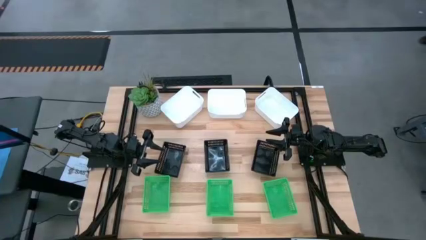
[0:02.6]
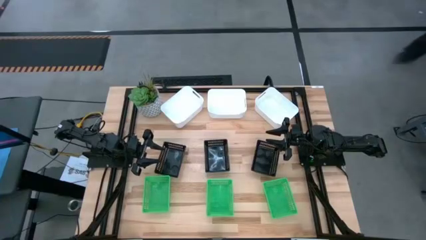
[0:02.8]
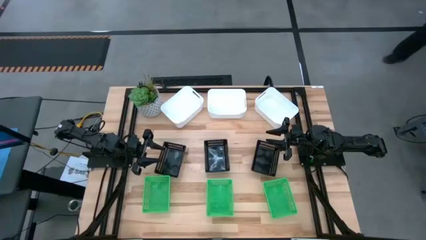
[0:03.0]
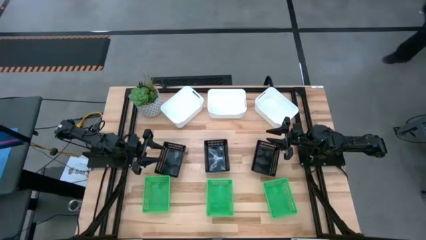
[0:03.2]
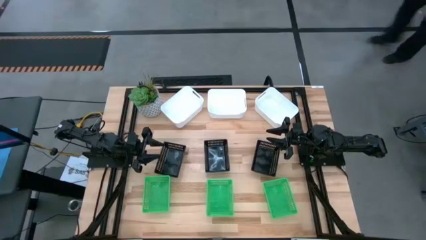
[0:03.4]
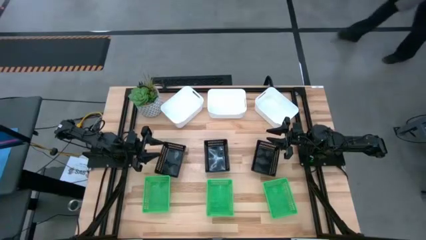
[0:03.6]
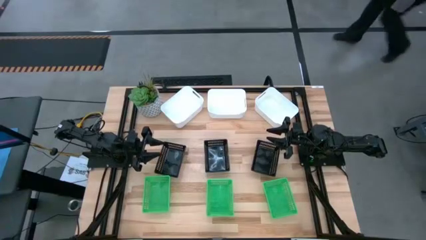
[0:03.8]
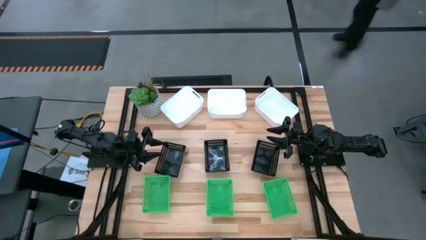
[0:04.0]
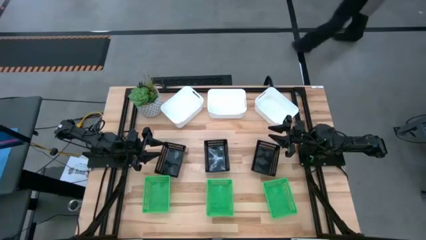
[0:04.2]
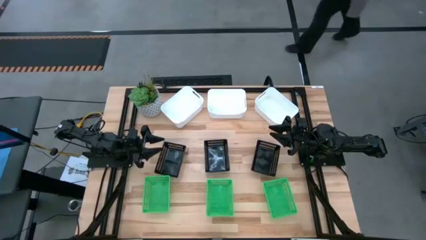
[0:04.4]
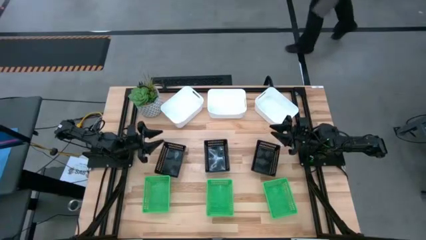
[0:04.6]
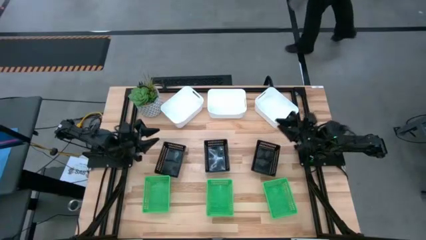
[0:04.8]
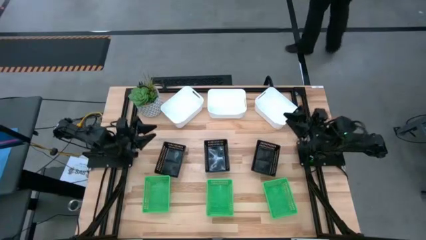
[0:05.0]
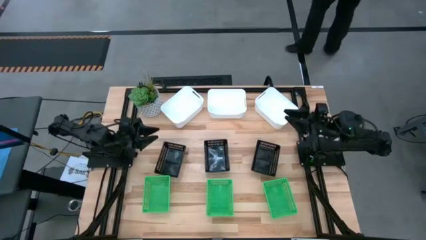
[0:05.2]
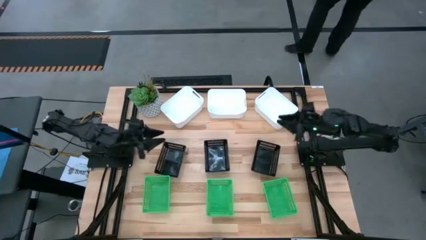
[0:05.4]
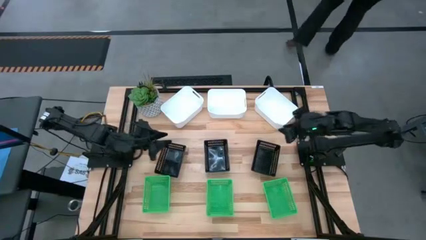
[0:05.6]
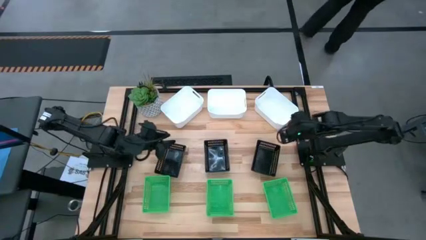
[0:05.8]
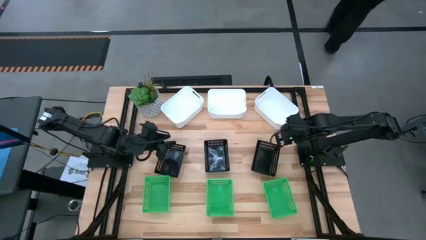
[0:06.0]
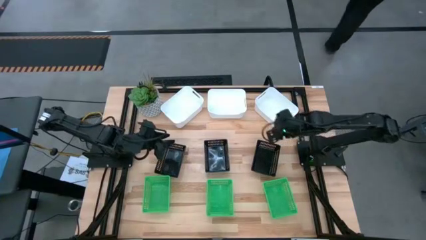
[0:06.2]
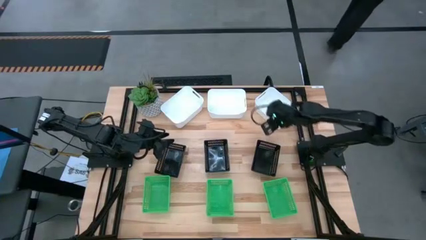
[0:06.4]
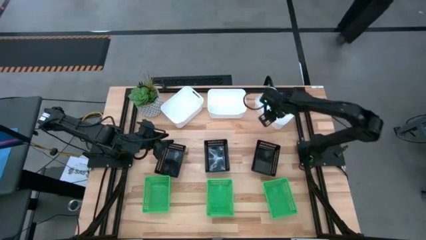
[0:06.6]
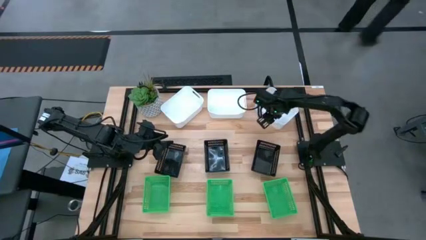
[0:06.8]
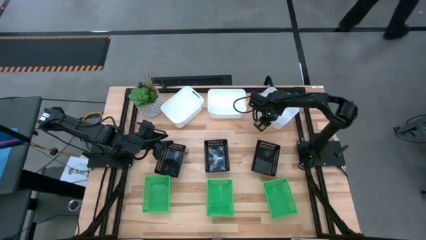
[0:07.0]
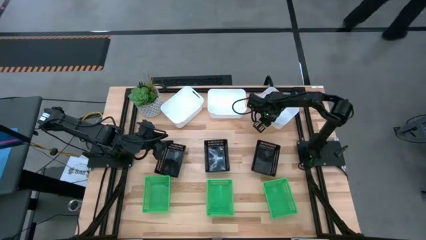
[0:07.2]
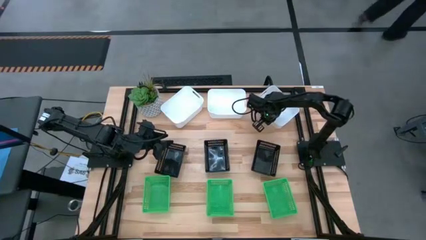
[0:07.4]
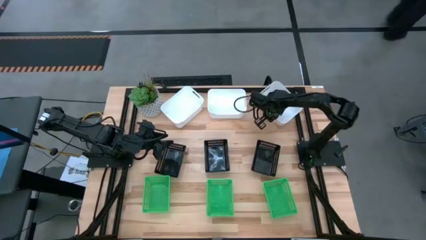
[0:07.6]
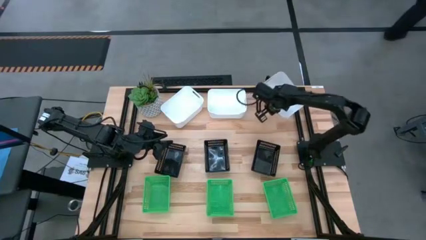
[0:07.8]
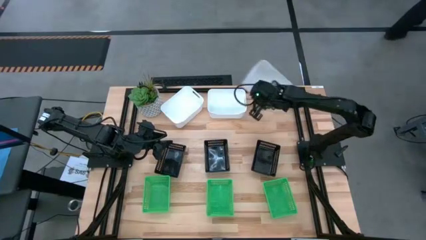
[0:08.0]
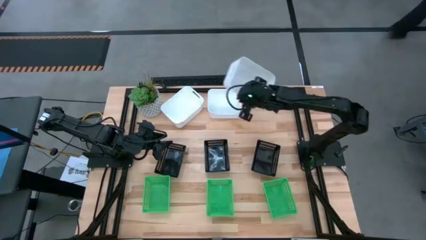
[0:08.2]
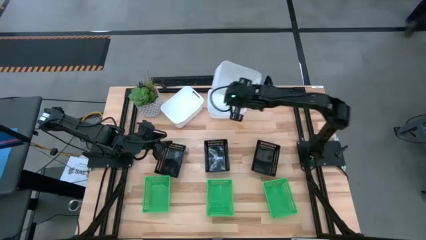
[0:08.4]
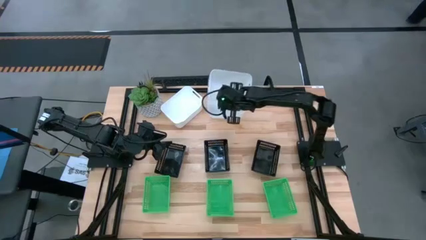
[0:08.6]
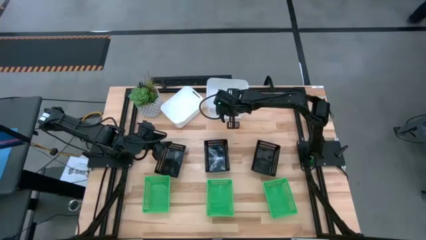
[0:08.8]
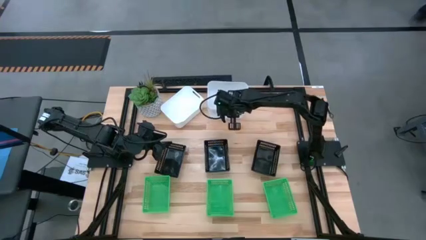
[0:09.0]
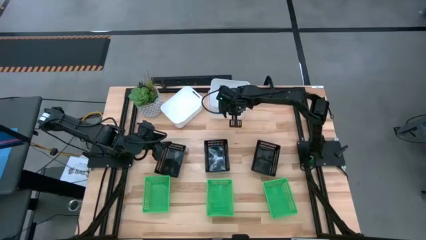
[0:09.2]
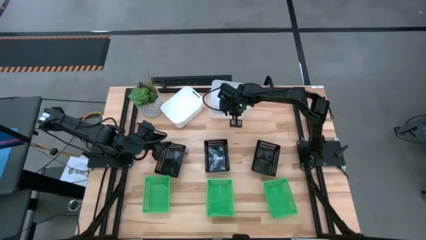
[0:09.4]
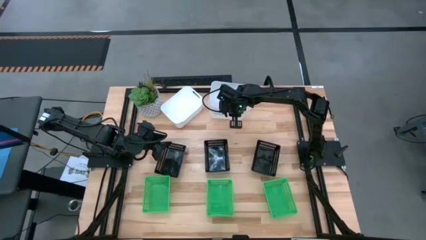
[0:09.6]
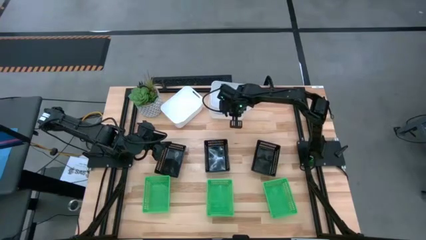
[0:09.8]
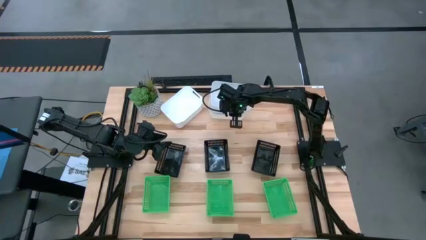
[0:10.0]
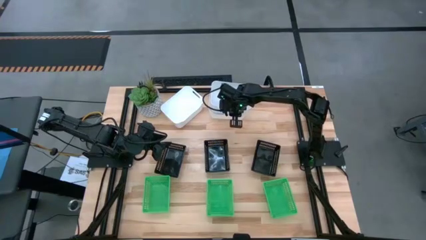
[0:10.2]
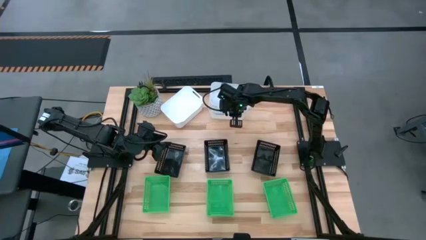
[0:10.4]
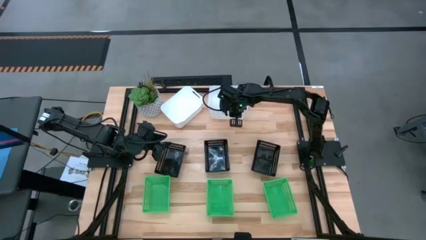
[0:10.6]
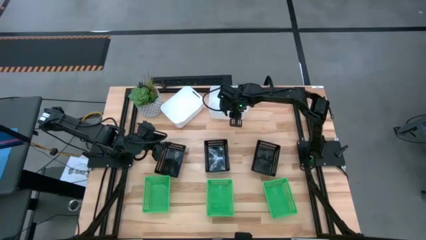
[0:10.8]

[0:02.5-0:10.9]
Stack the right white bin on the middle white bin

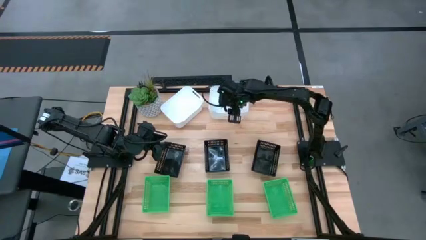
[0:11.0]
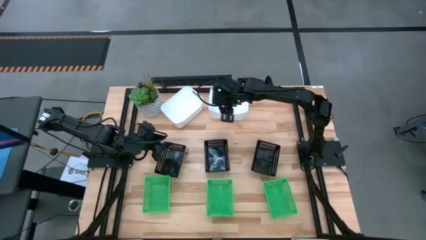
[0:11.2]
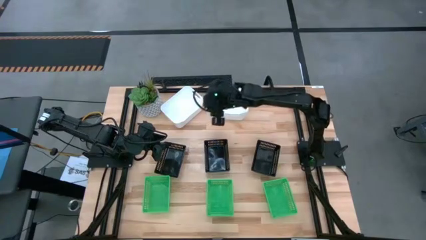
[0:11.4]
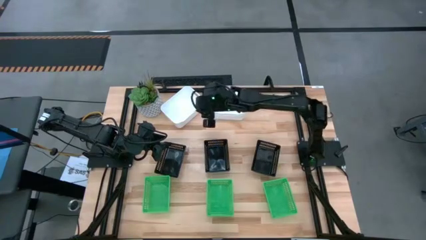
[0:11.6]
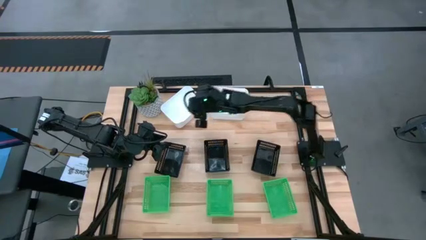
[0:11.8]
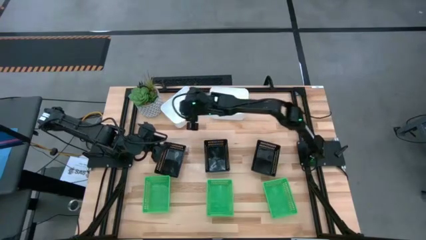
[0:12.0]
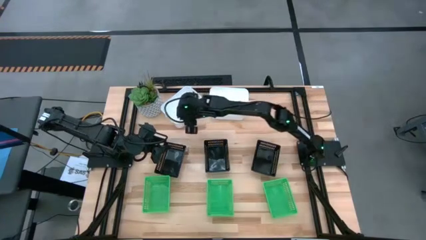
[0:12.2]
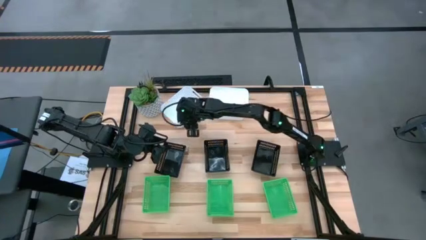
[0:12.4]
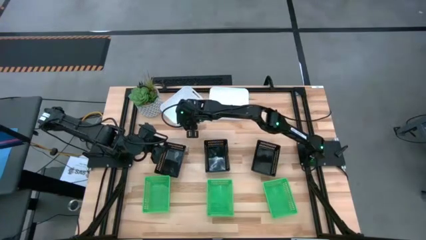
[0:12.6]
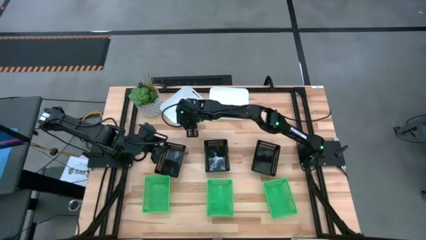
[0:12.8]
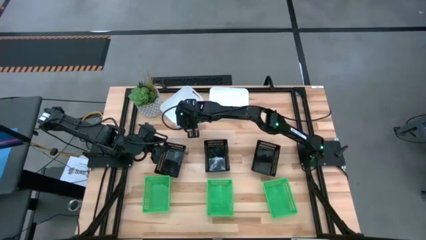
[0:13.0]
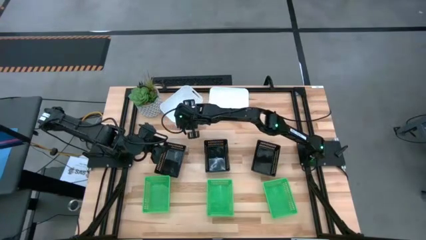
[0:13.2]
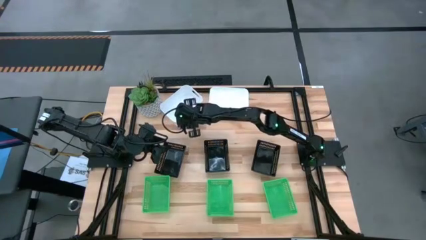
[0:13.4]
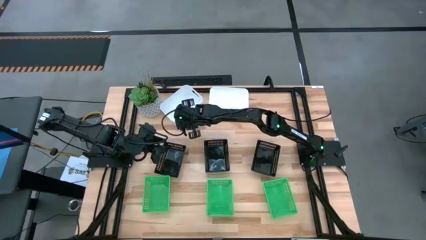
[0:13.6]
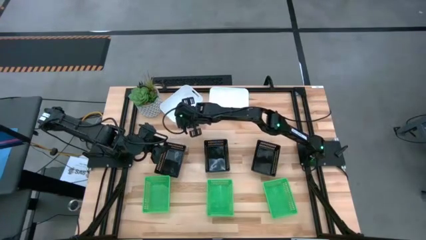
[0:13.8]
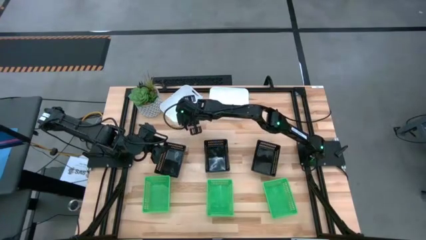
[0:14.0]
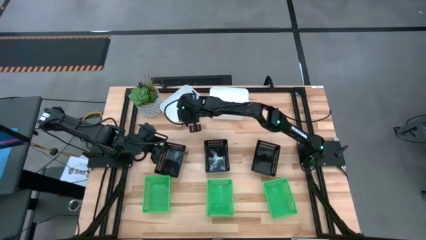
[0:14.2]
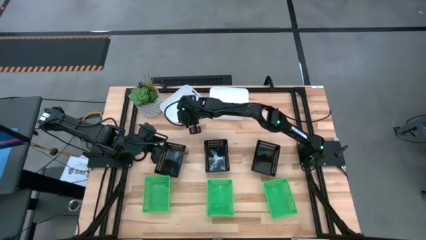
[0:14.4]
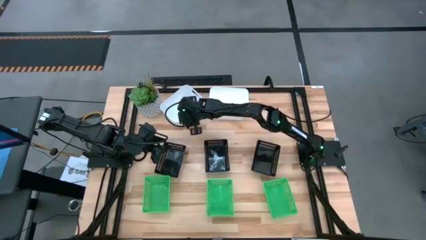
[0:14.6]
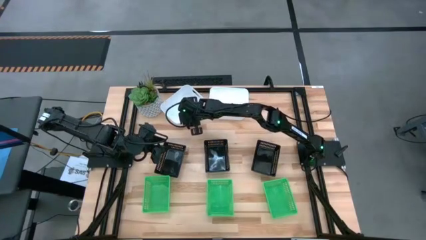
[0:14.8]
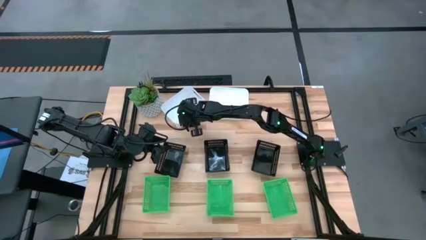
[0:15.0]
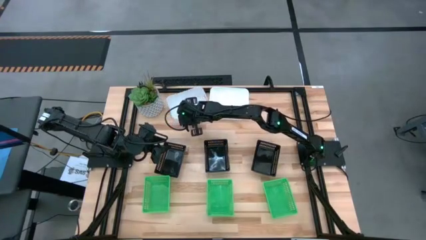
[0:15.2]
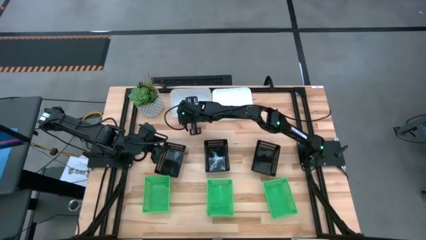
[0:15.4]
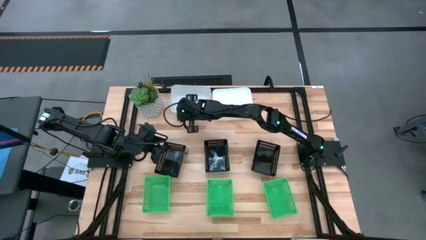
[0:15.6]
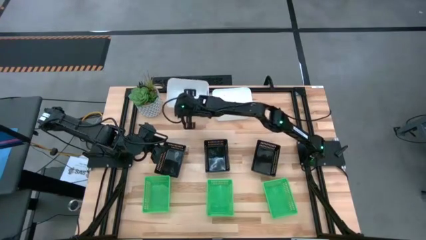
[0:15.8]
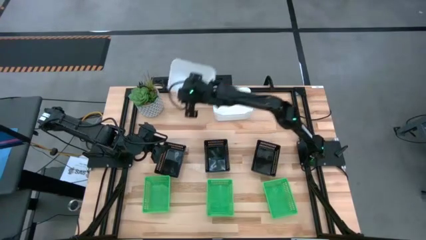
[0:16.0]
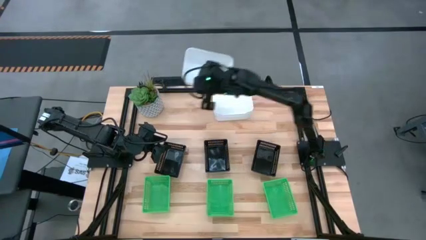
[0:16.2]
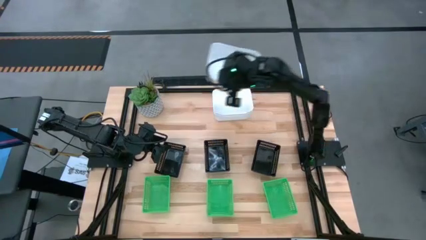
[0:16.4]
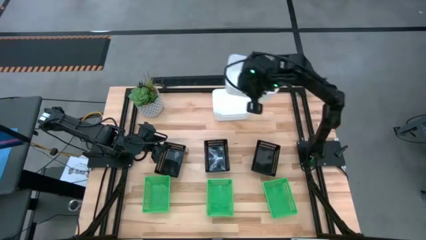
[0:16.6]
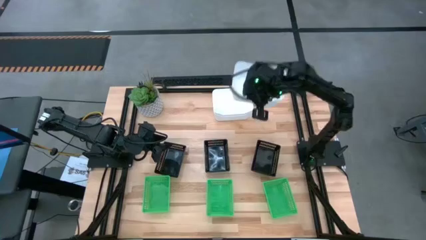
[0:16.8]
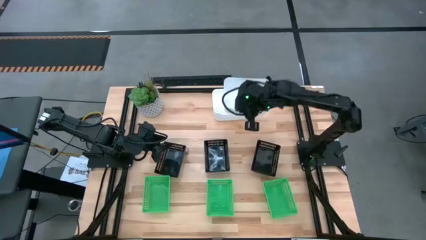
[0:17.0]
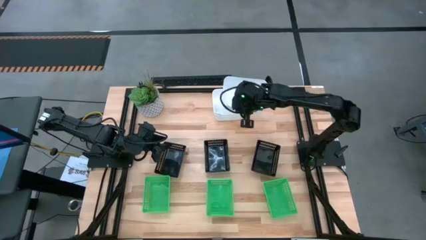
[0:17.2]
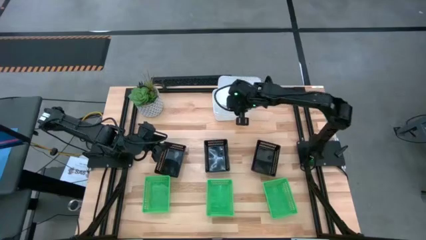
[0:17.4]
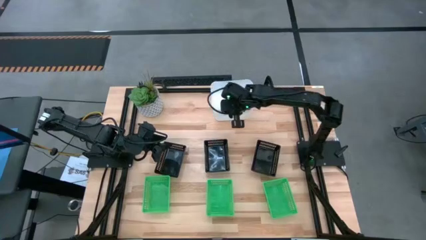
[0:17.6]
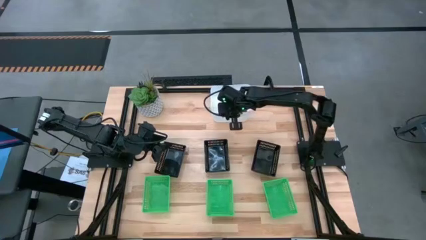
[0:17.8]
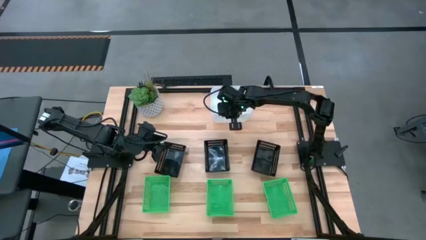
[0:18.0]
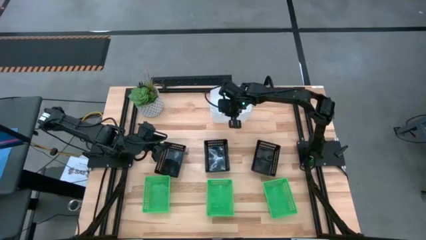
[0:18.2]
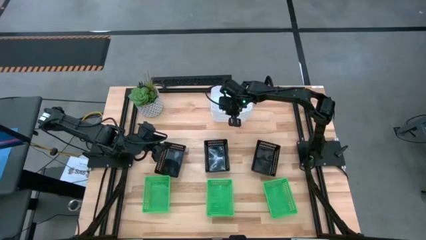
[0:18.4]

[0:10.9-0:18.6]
Stack the left white bin on the right white bin
